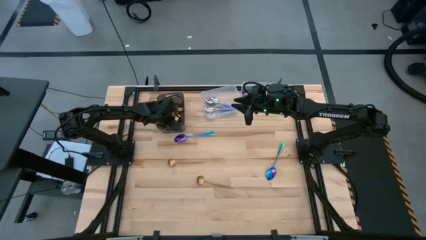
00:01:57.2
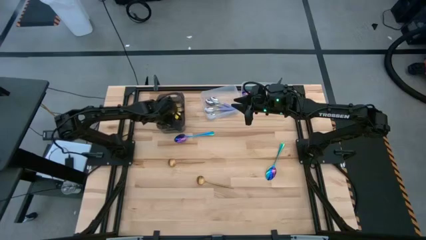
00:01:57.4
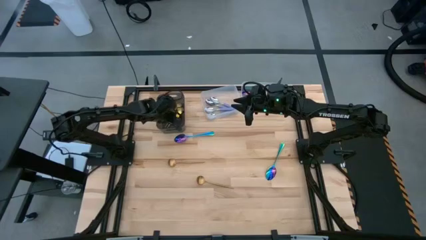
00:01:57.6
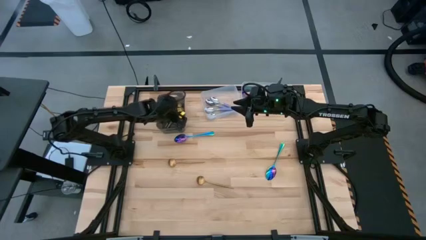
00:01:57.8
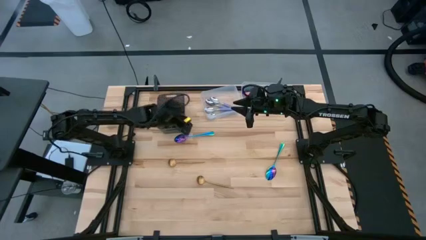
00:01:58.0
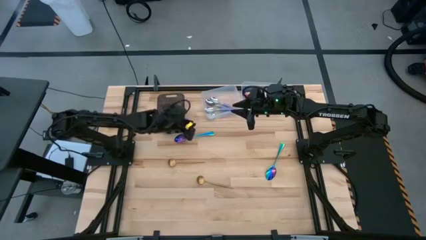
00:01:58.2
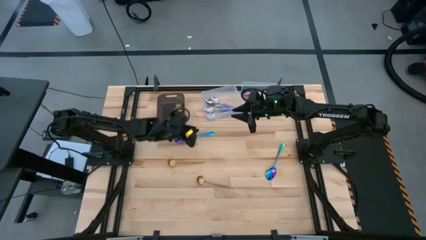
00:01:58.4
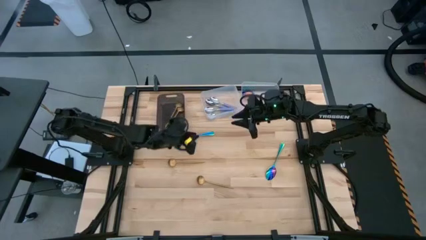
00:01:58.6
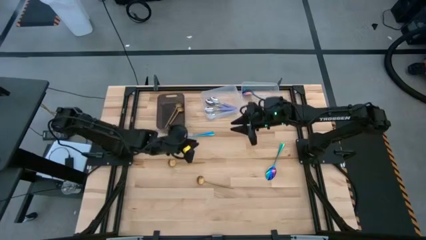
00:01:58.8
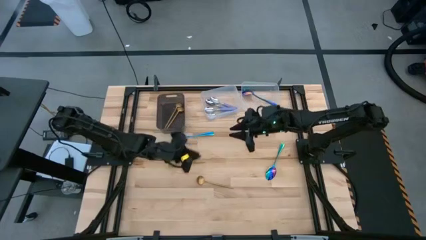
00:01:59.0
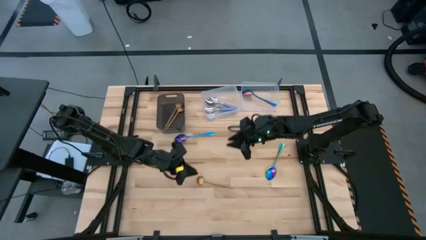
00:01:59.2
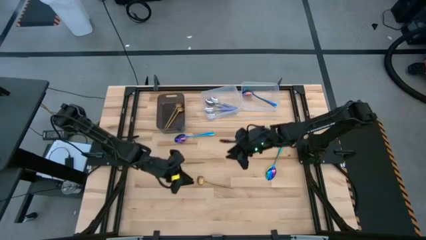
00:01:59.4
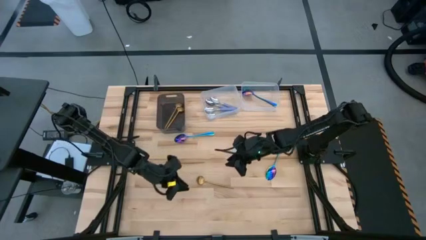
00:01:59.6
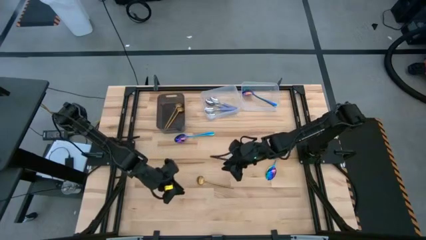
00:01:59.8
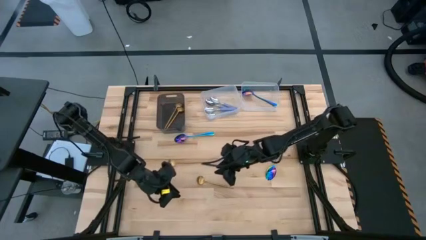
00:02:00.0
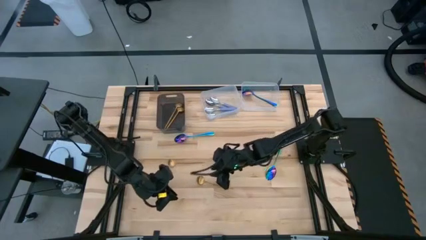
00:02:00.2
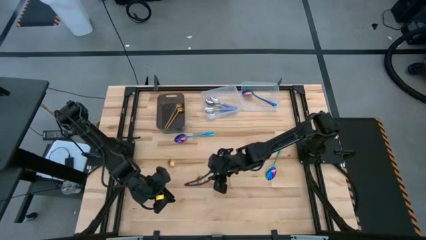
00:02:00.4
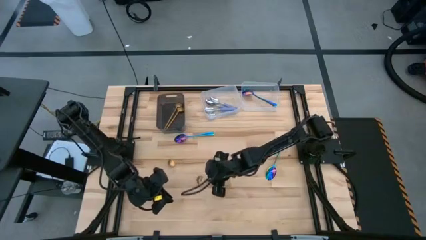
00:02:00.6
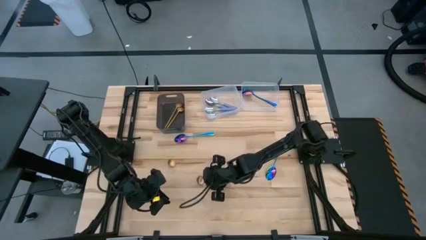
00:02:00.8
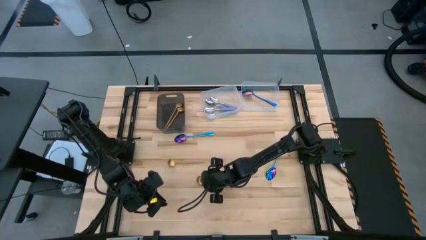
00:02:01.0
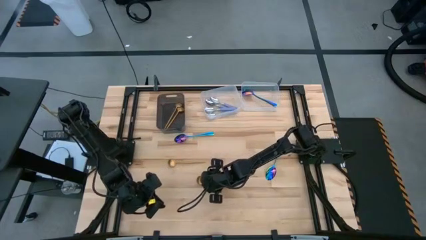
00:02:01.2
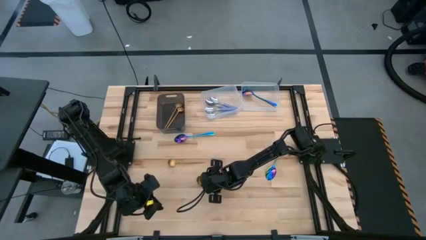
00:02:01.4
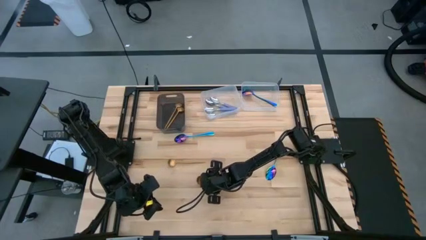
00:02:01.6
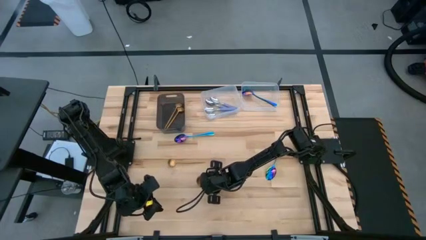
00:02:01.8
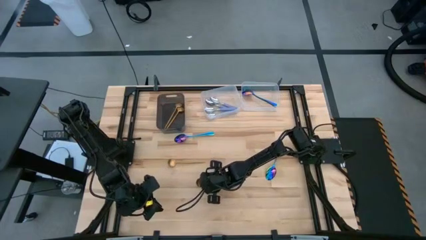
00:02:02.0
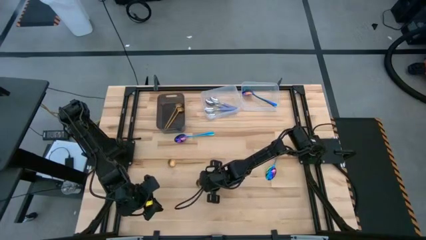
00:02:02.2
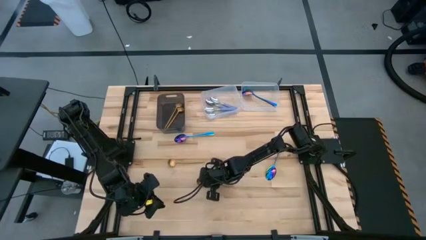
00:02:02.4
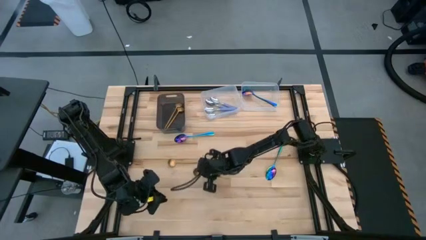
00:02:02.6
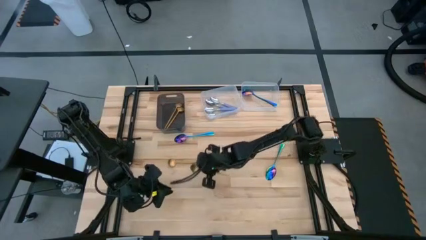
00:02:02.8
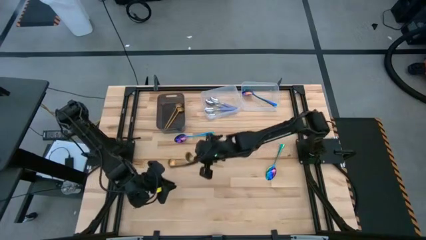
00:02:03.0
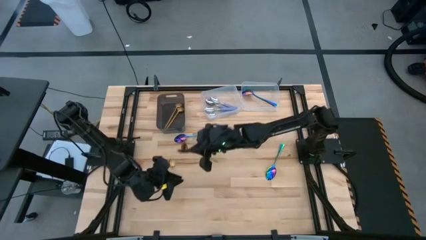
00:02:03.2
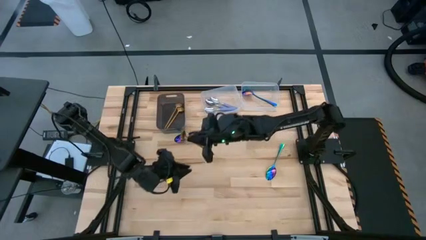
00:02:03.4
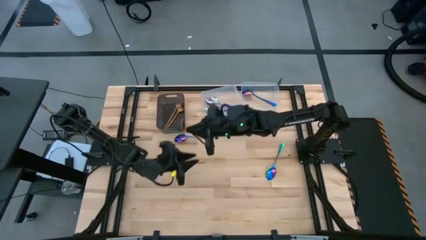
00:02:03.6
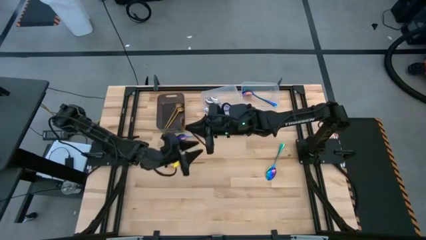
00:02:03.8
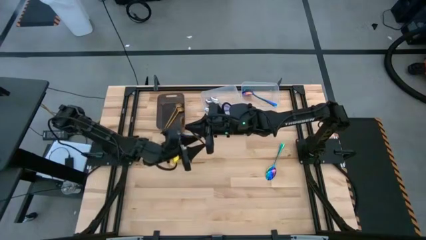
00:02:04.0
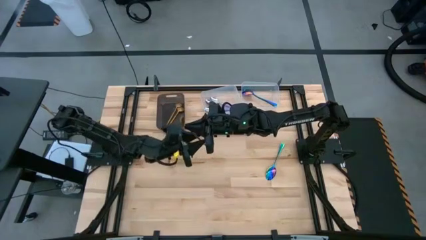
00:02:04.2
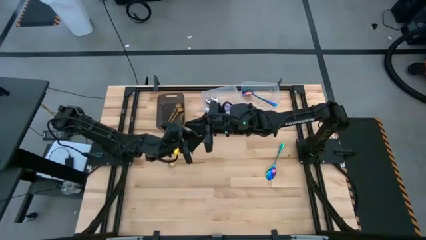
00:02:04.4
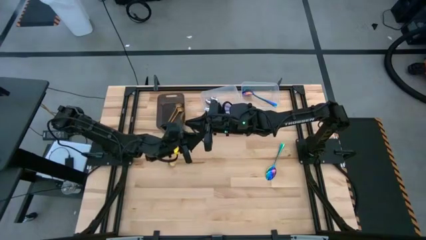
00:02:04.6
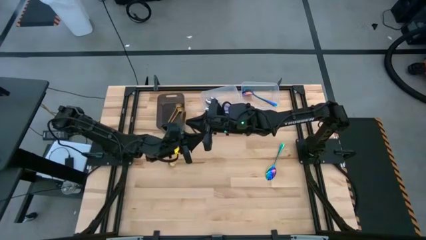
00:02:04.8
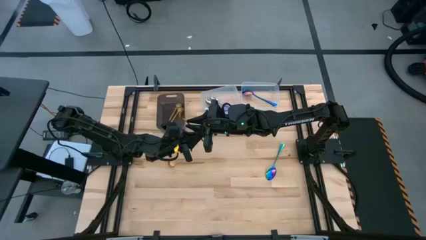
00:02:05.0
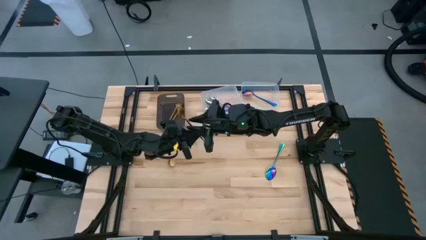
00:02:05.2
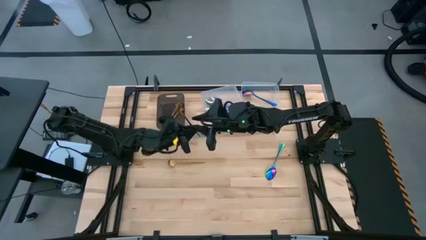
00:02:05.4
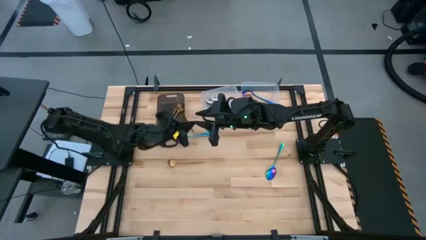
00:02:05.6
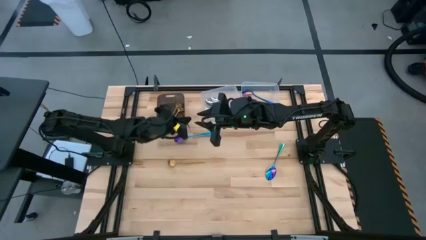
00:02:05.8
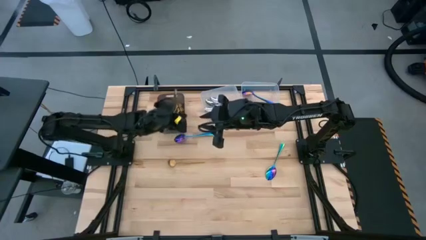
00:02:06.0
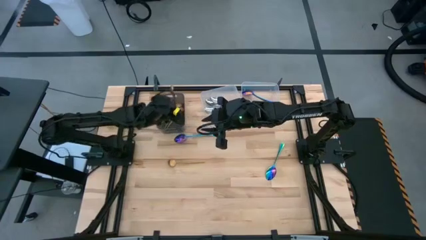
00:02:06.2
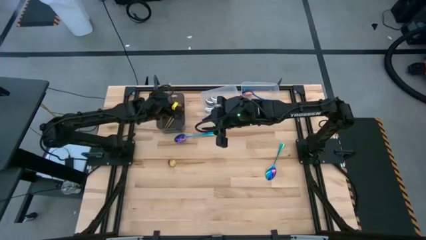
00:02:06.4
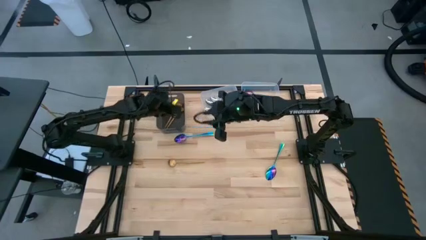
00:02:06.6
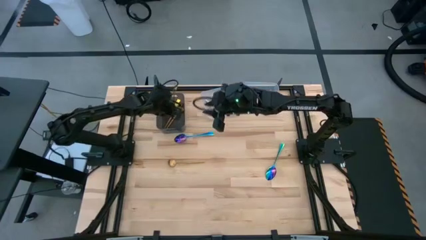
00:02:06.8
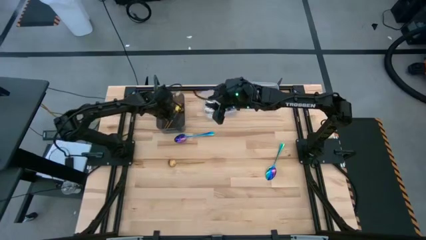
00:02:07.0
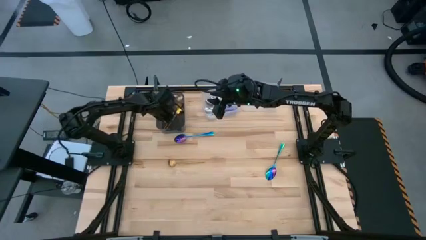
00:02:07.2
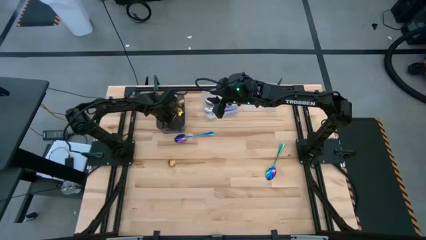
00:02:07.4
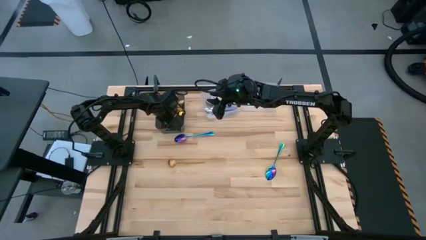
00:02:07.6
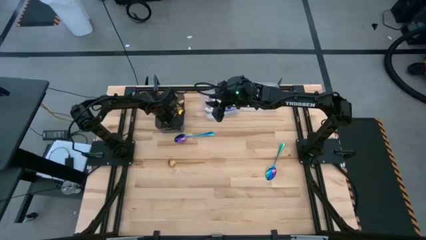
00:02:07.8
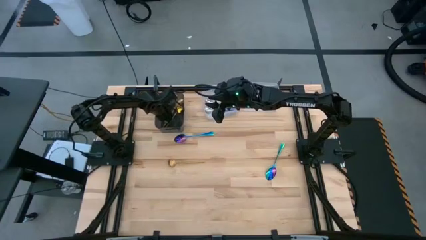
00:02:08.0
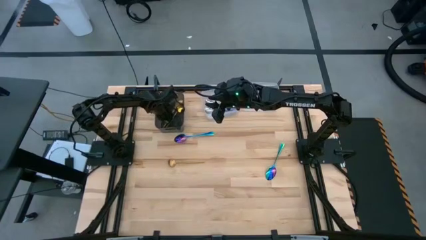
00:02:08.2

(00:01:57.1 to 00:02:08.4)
Task: Sort silverware by color (type)
Put the gold spoon into the black bin
